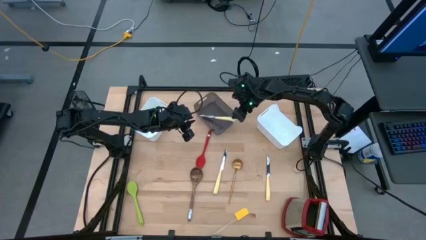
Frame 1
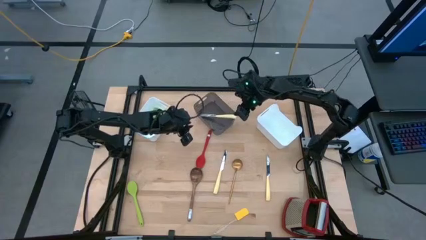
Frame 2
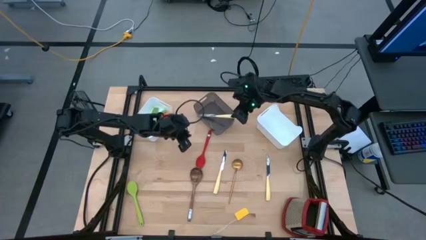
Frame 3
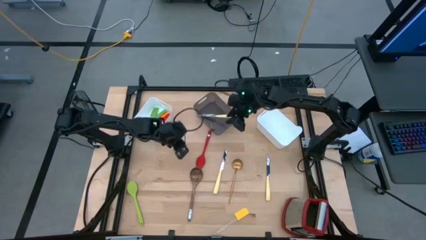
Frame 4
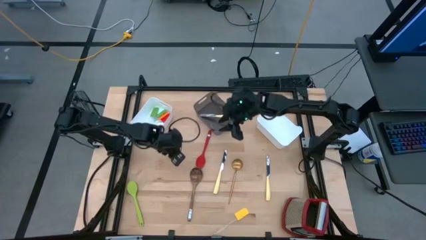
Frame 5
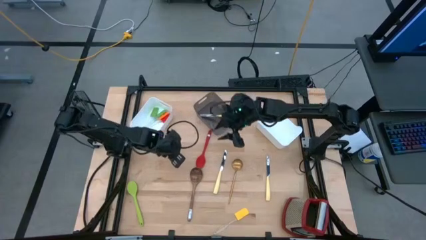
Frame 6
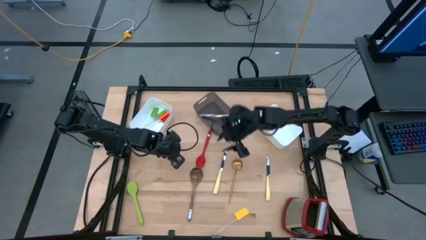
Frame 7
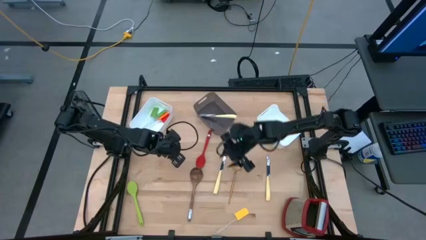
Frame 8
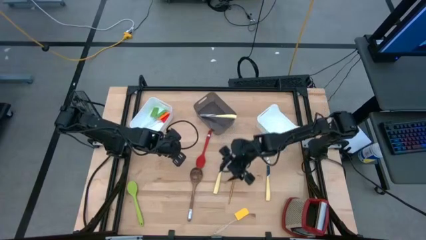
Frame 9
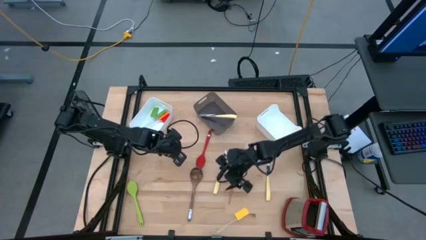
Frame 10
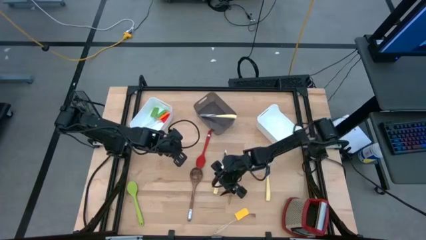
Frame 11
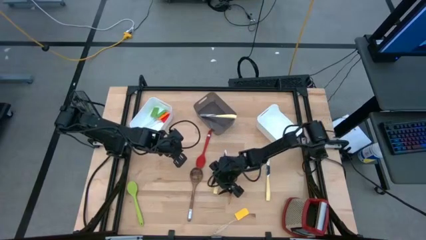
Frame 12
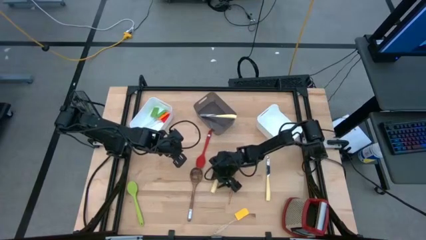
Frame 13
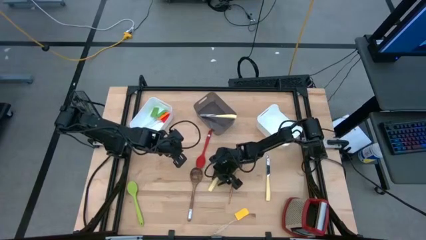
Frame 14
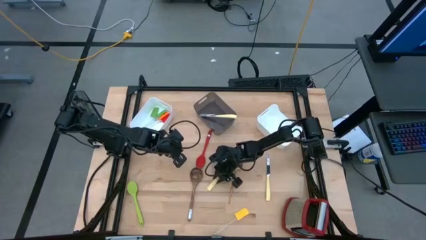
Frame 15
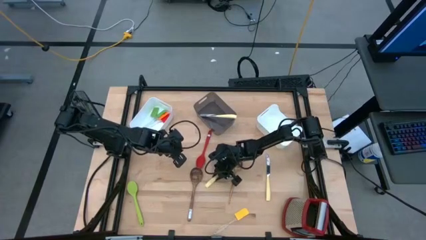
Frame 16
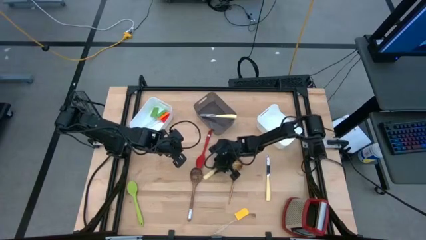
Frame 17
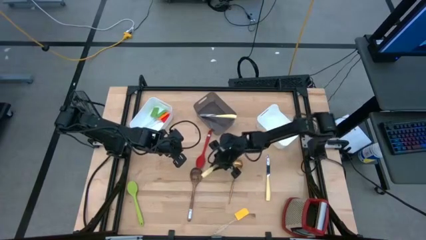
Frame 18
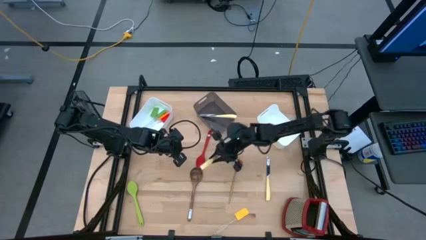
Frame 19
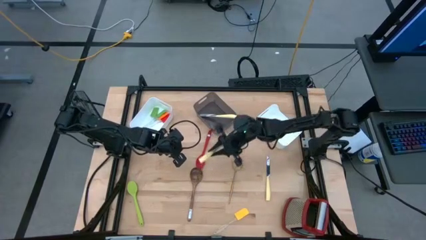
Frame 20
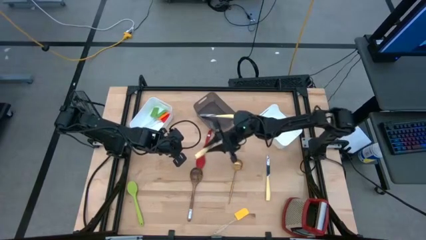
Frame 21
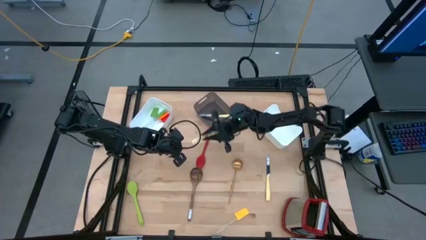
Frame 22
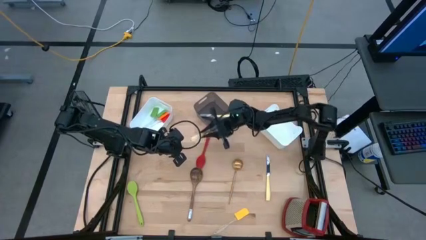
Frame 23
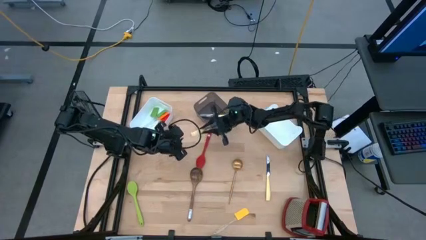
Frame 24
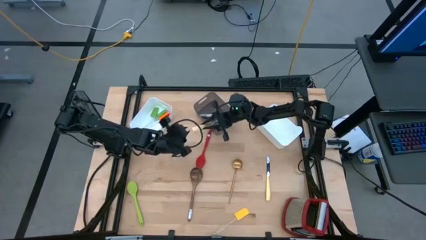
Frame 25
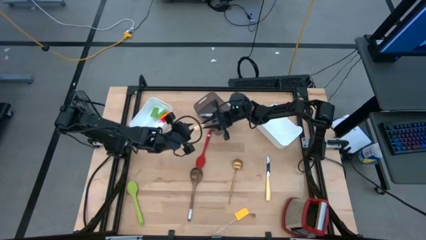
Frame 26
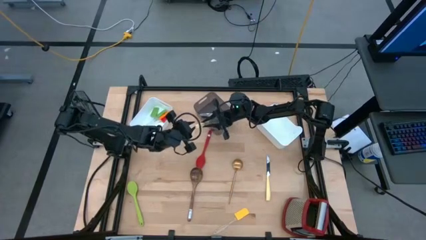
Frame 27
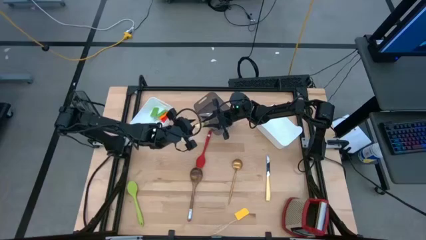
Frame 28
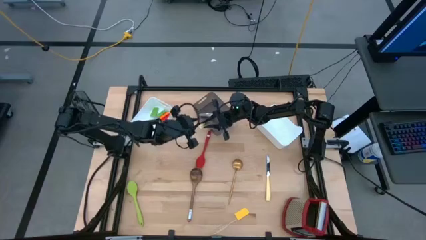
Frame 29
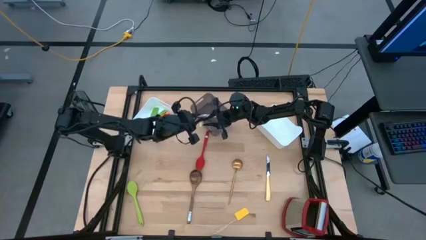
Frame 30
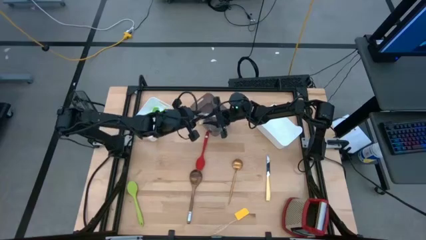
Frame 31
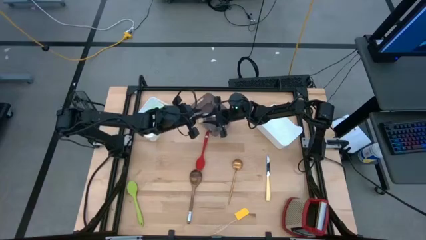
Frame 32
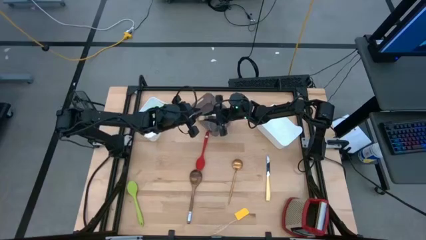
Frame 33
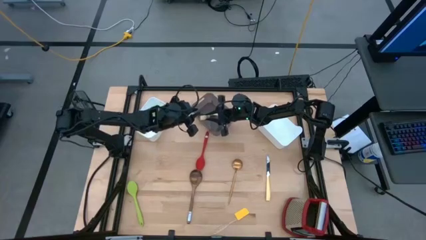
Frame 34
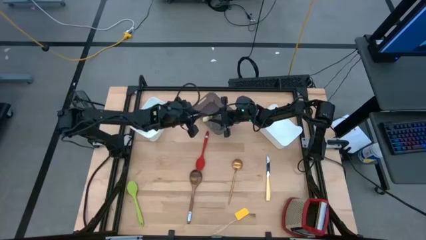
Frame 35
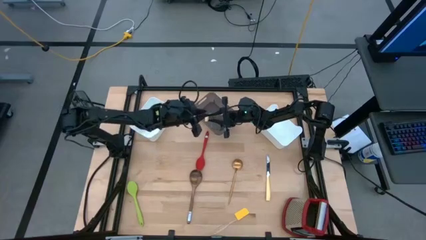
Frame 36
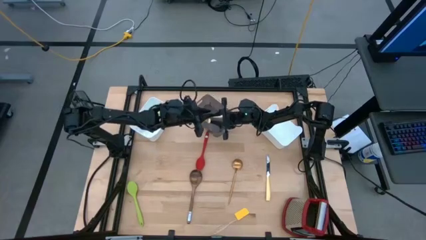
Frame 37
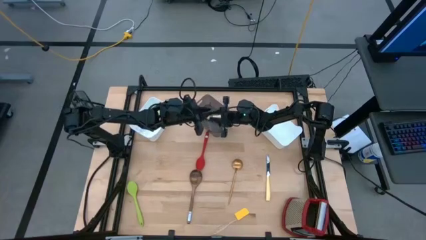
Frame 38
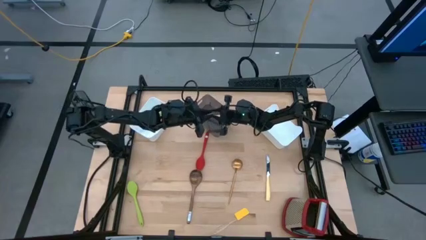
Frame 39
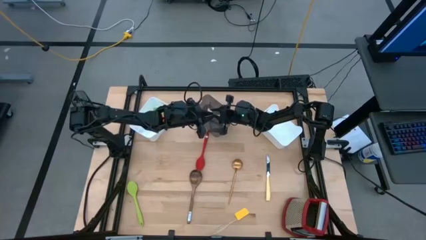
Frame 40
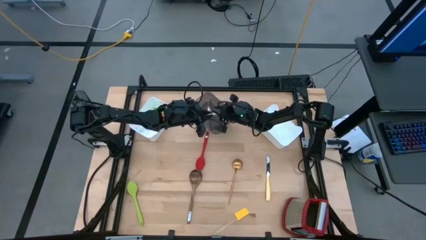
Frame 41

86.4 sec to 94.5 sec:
Task: Pick & Place Kitchen Items
Put the left yellow table knife into black bin

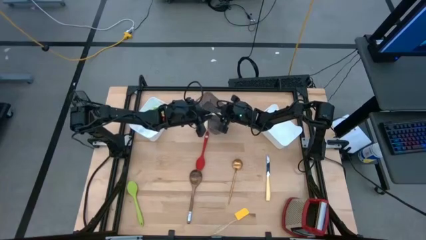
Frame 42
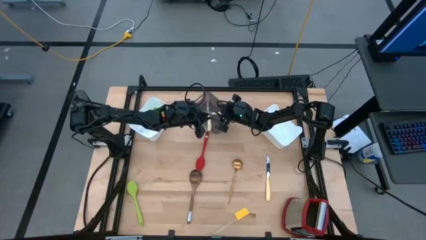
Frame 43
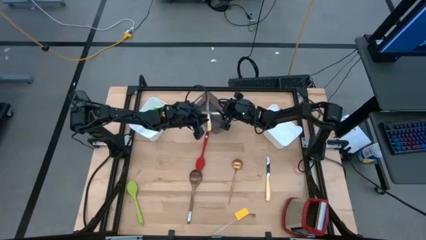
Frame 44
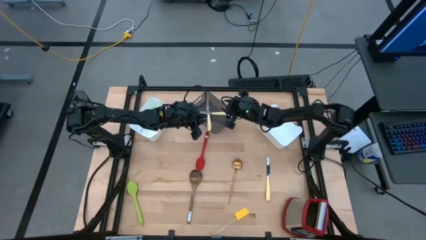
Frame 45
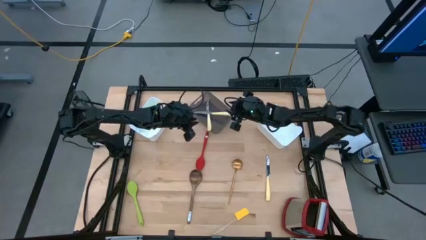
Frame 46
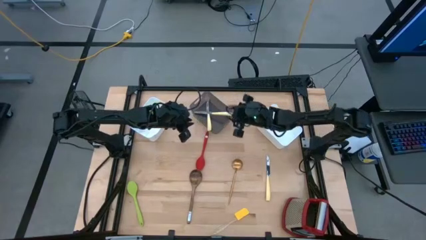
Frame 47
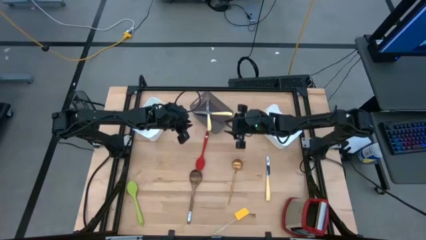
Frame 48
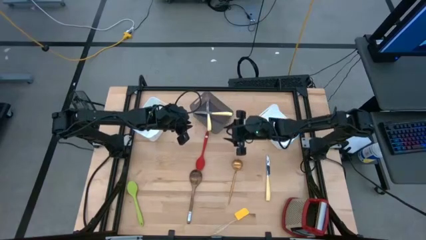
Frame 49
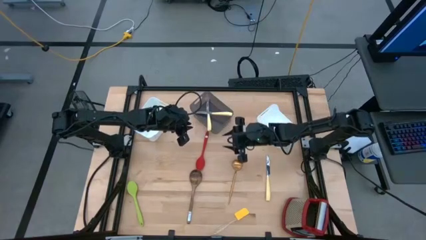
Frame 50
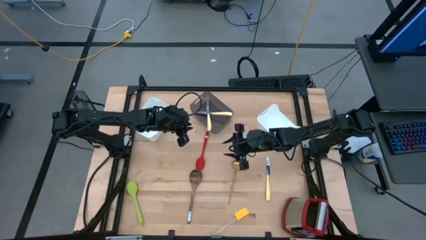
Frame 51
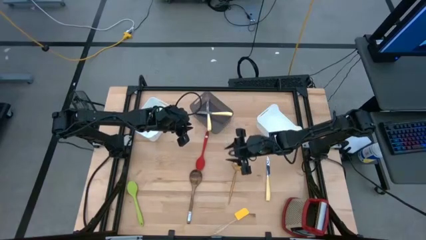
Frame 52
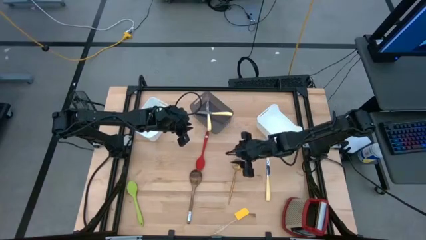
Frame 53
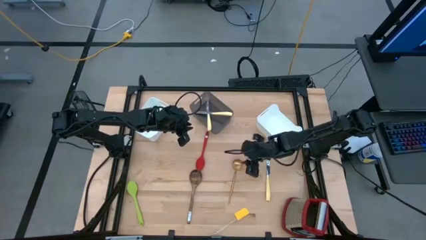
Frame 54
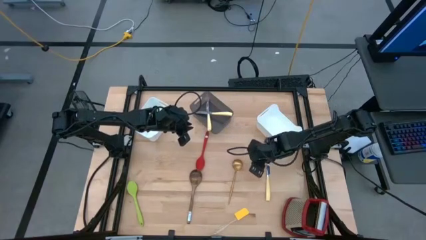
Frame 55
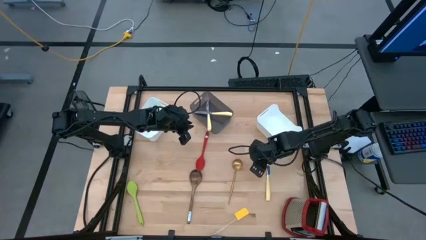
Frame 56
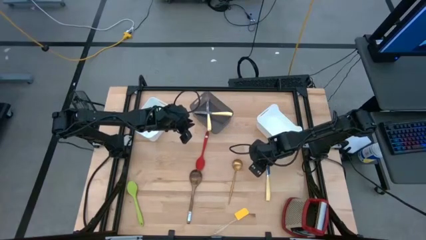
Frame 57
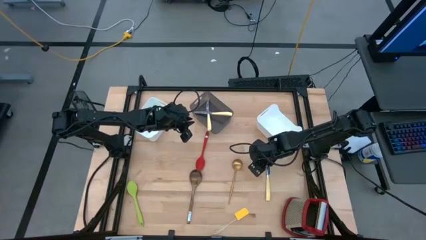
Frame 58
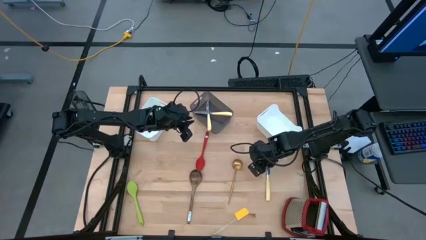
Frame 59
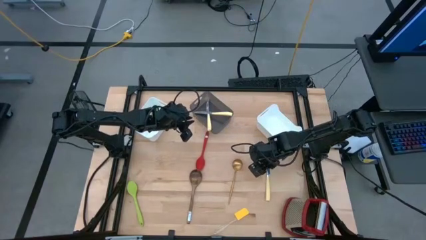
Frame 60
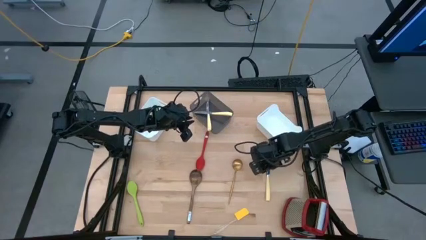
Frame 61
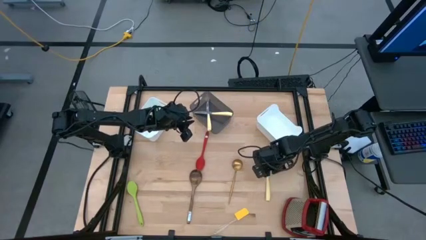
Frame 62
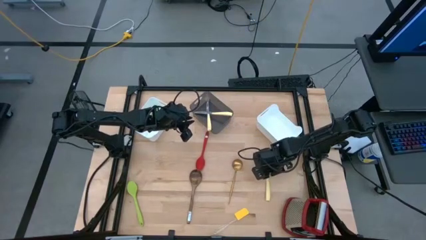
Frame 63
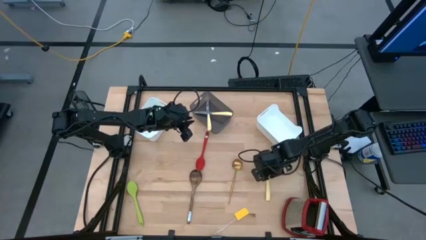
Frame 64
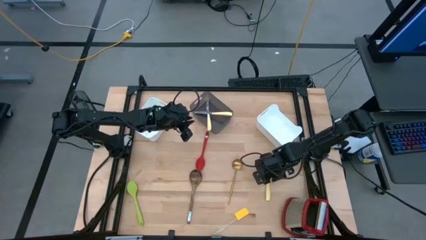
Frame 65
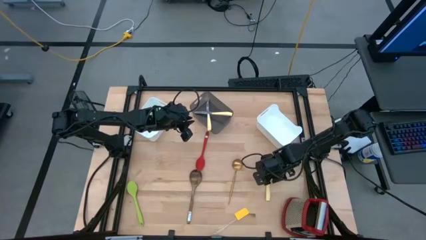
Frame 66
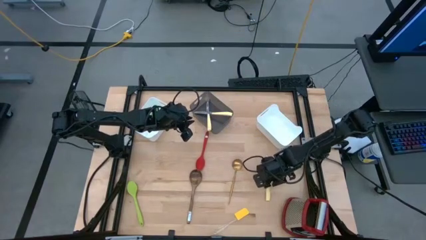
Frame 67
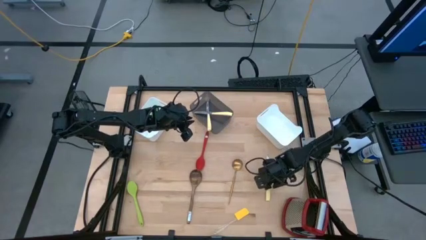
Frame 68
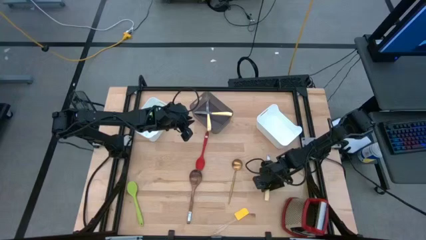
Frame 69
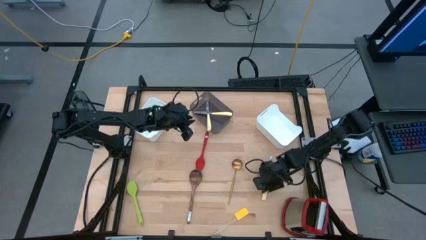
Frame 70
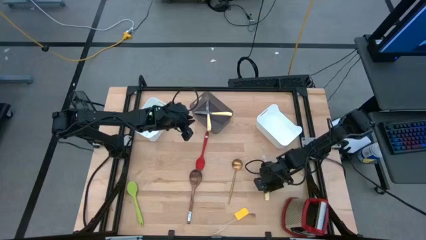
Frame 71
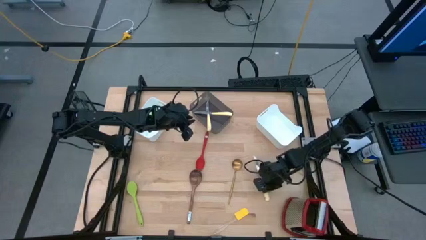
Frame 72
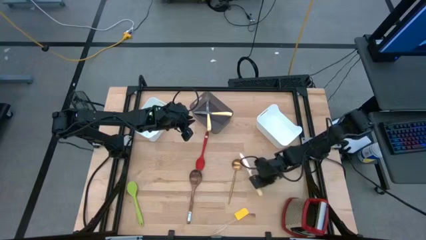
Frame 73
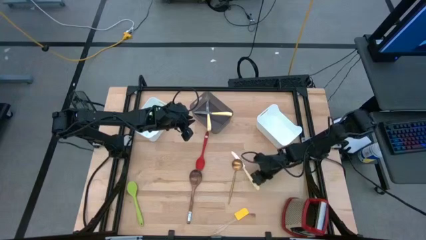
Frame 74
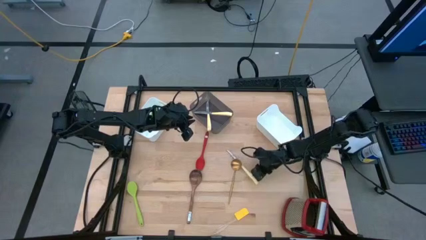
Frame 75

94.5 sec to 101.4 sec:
Put the yellow table knife into black bin

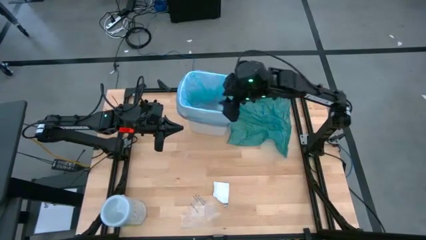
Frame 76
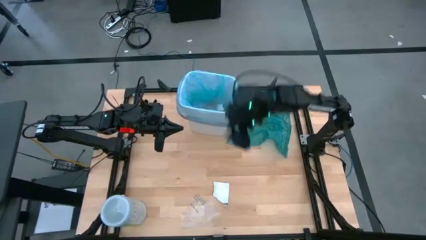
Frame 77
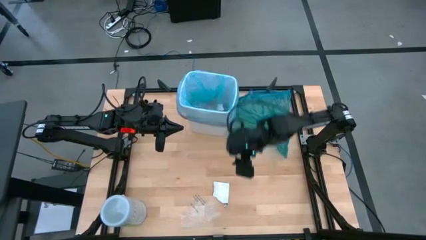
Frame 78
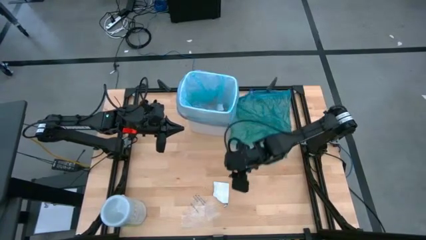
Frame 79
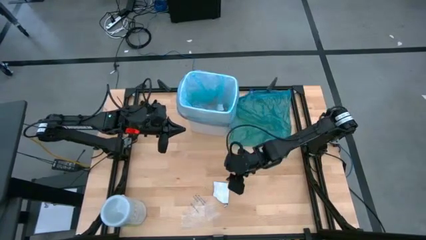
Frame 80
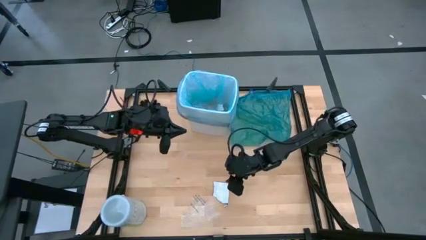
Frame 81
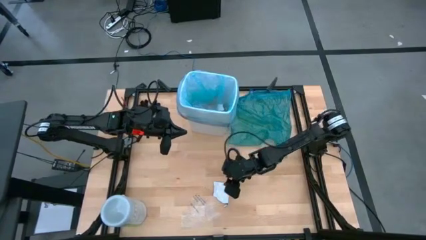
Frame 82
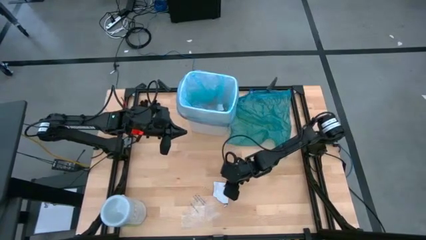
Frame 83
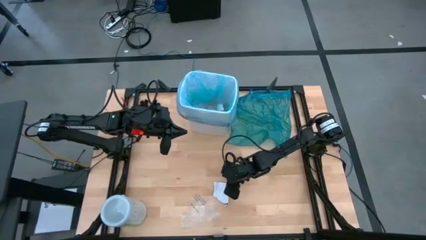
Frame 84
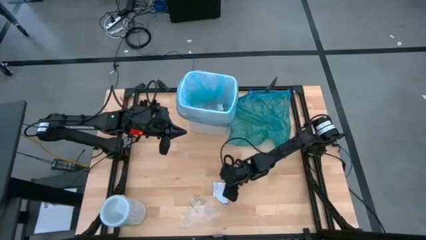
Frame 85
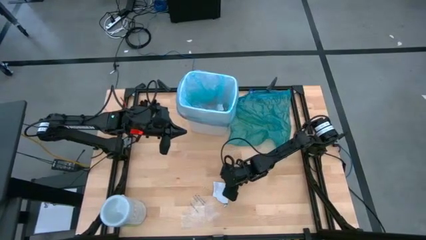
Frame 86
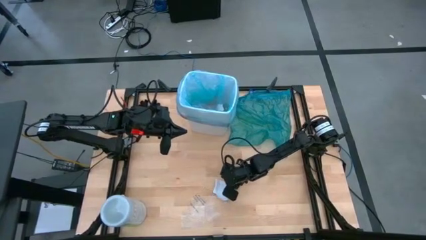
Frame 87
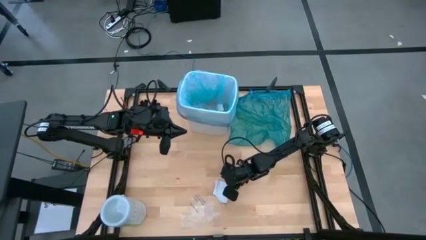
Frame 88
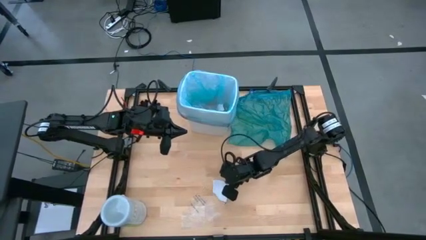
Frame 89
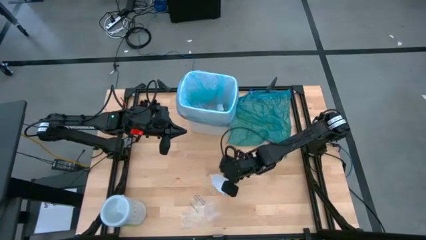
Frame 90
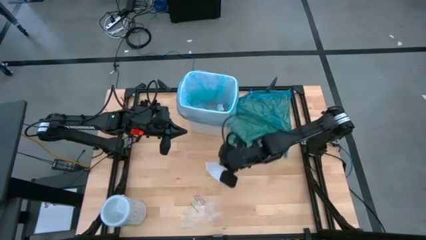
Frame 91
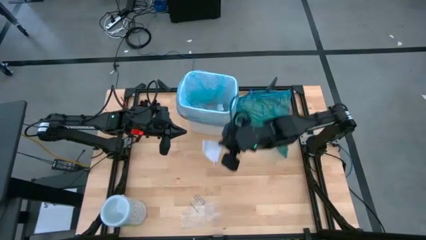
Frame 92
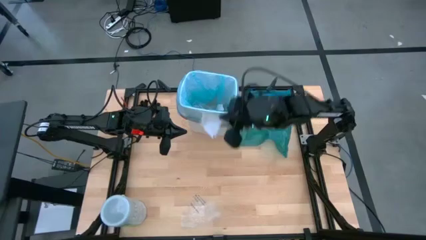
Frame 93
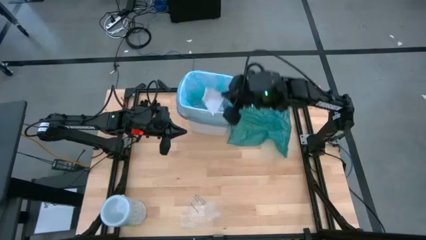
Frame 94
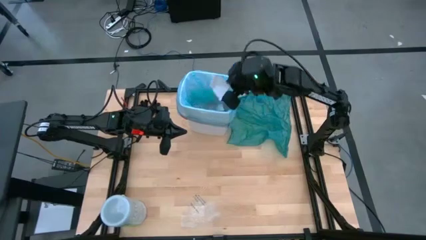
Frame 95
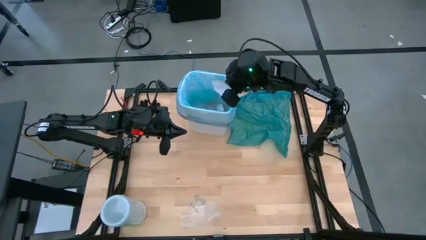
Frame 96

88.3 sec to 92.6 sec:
Task: place trash/remove bag and relplace
Put the white magazine paper into the trash bin
